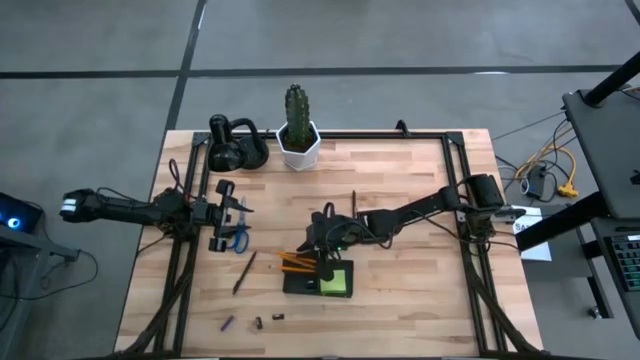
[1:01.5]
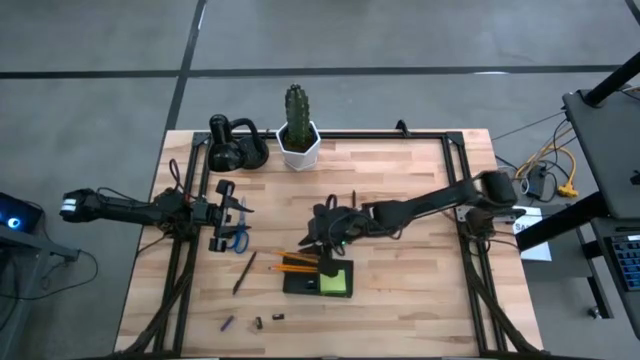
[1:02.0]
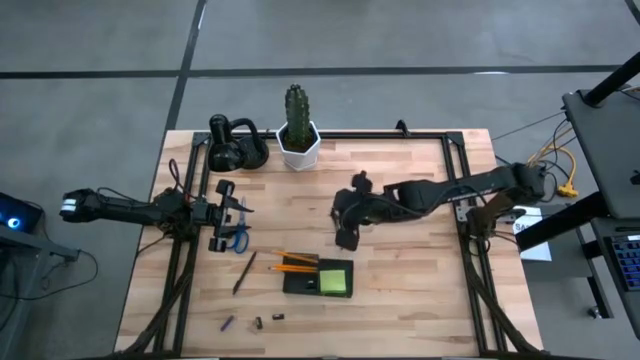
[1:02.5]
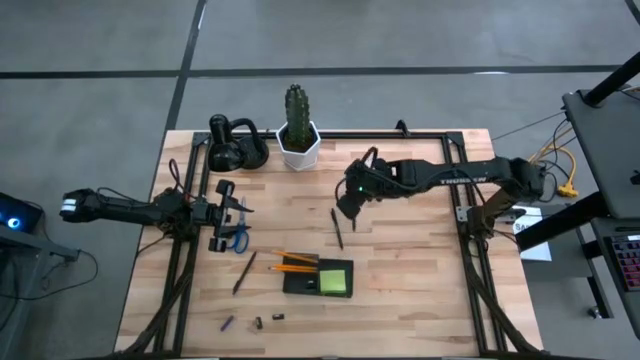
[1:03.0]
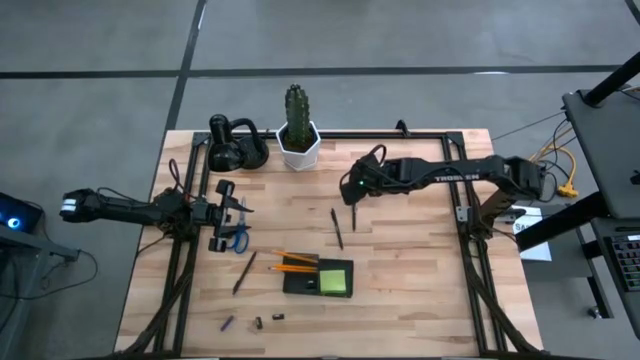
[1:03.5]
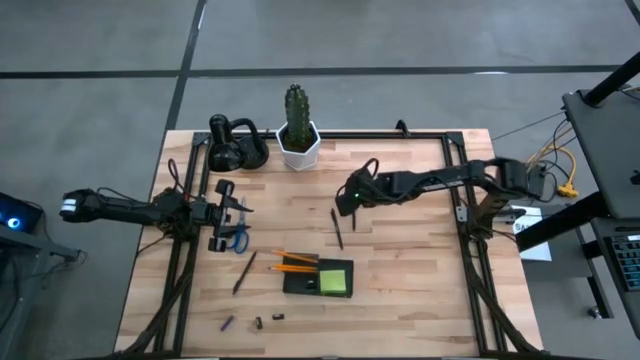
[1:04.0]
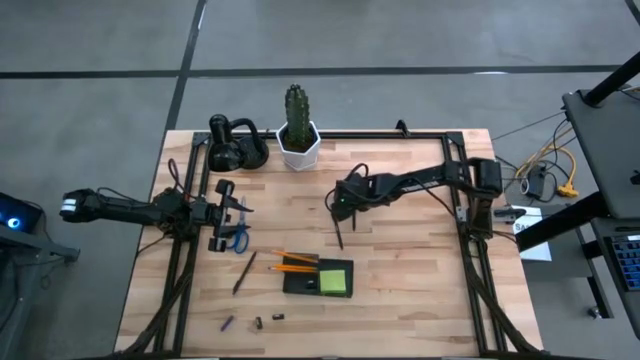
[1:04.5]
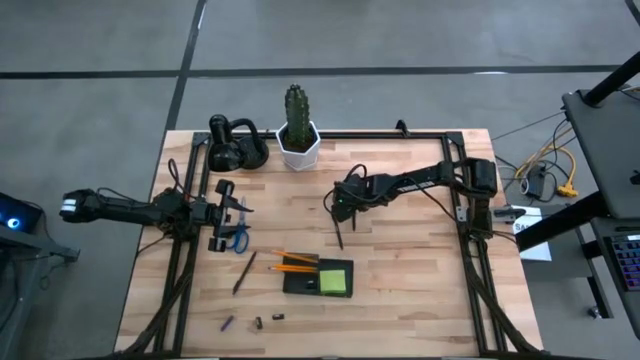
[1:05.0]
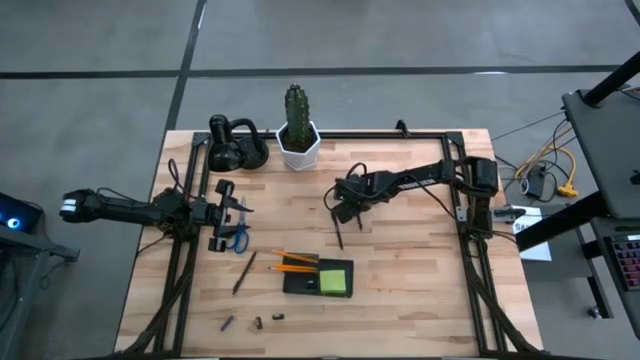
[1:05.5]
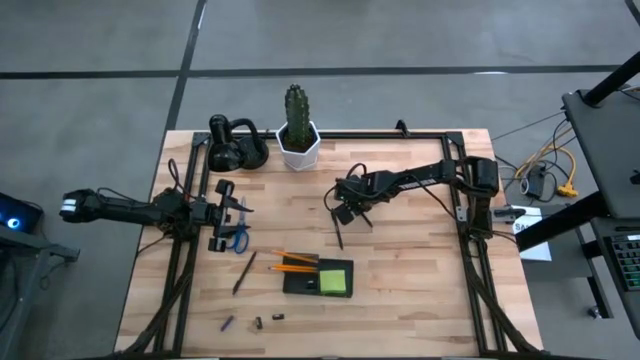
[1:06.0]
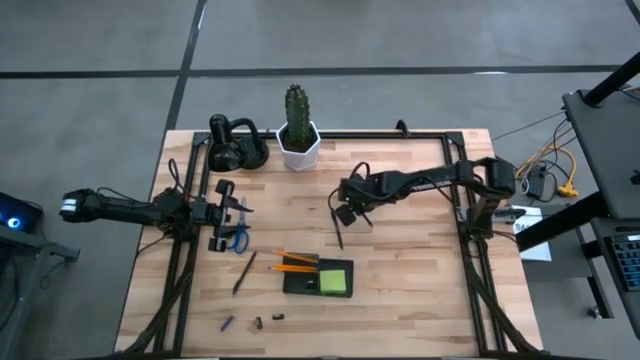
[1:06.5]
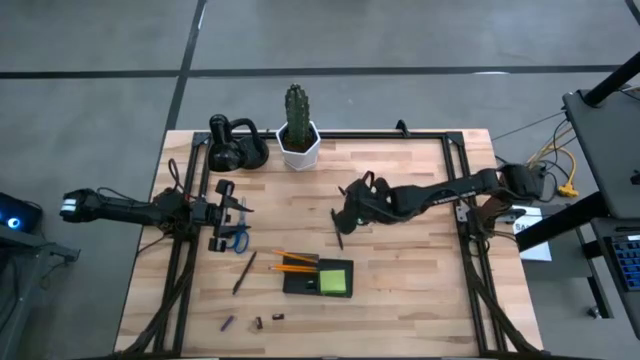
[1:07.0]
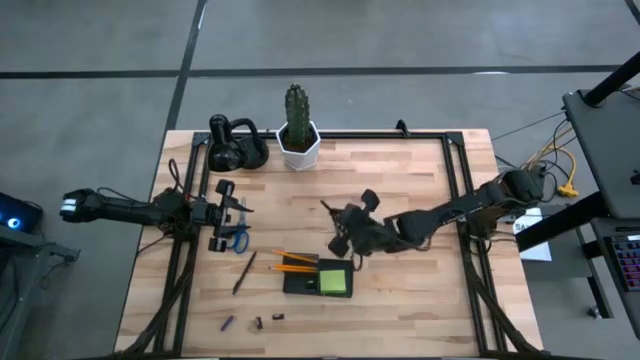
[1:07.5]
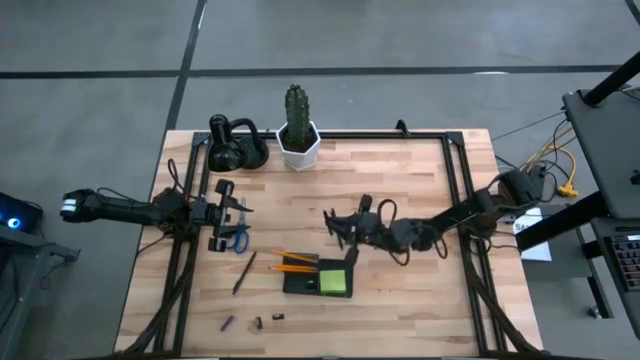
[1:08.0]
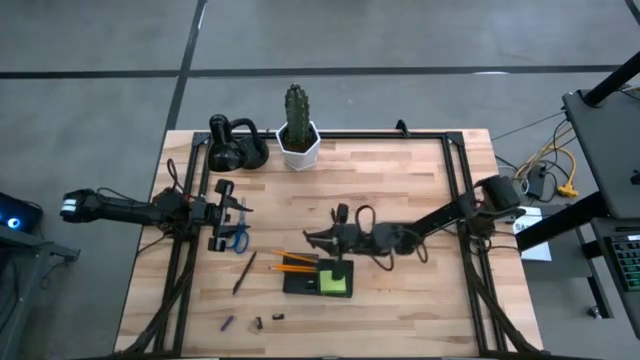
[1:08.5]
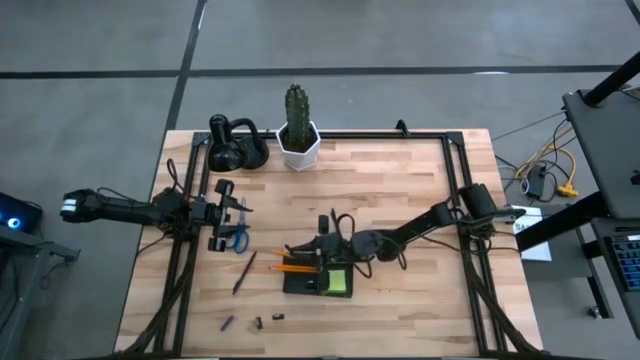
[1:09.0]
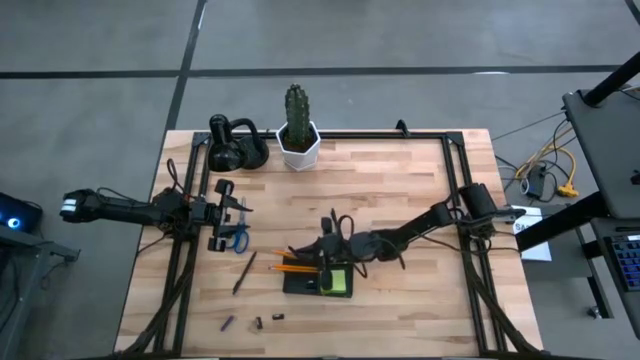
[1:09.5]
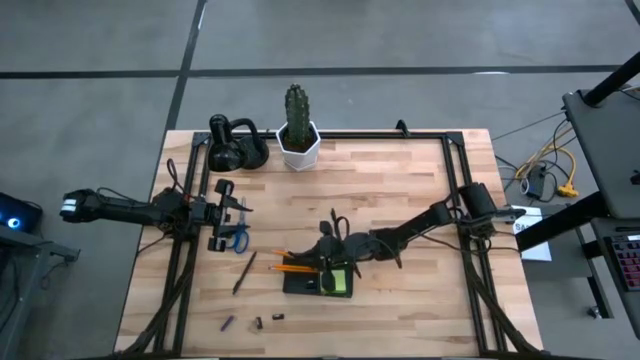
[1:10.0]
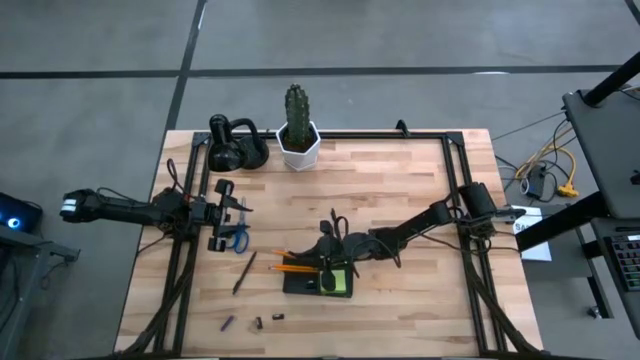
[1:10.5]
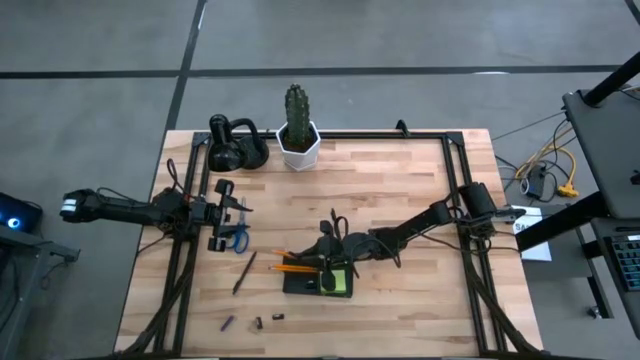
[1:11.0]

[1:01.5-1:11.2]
Task: Pick and place office supplies into organizer
Put the right black ballpen into the desk organizer

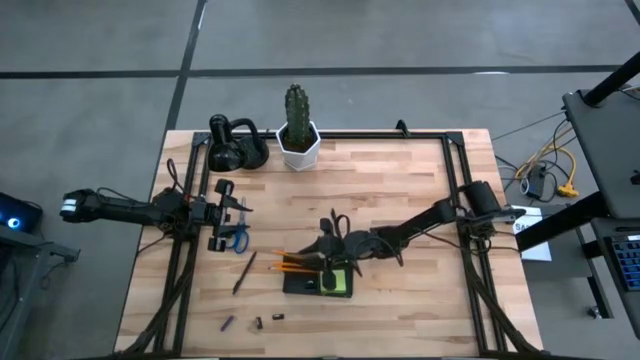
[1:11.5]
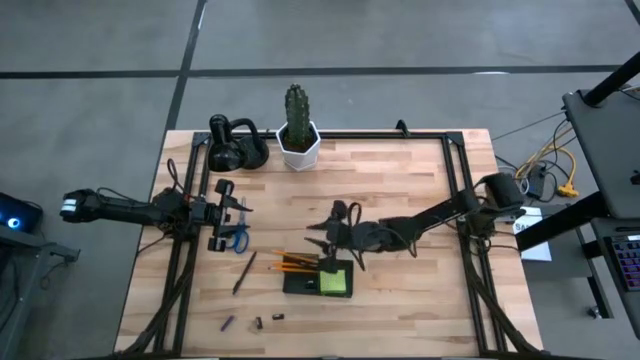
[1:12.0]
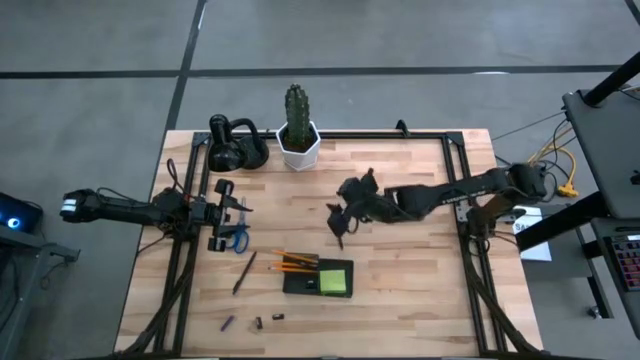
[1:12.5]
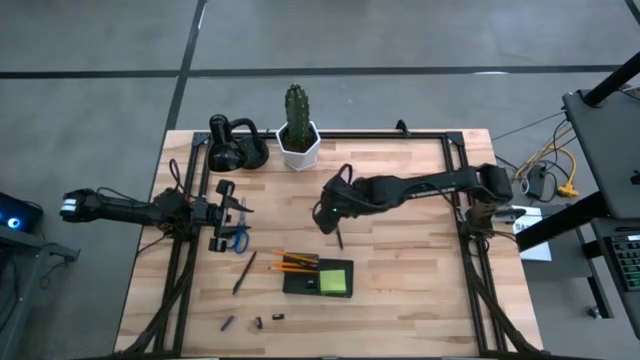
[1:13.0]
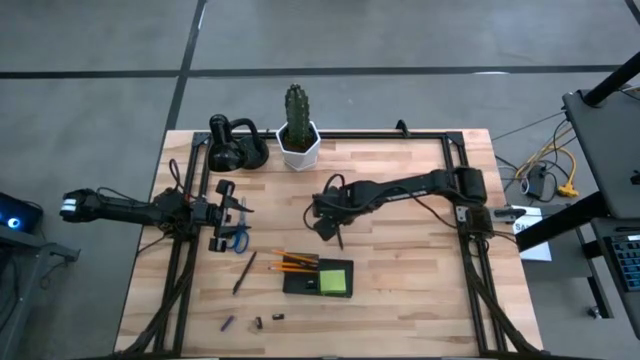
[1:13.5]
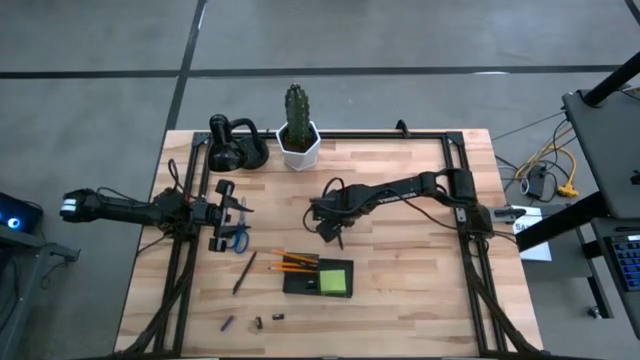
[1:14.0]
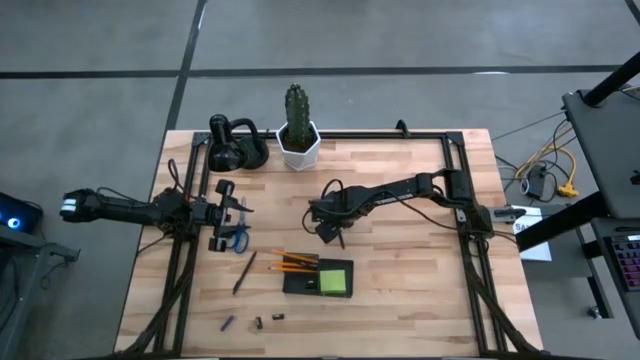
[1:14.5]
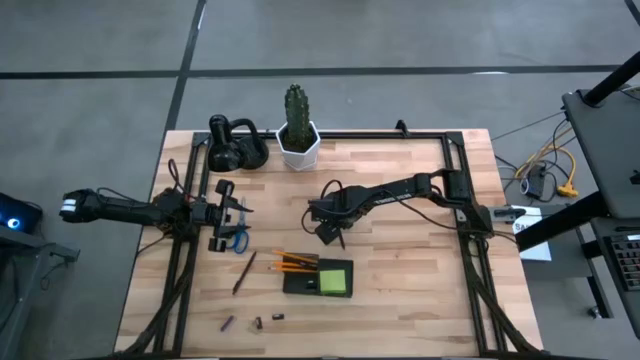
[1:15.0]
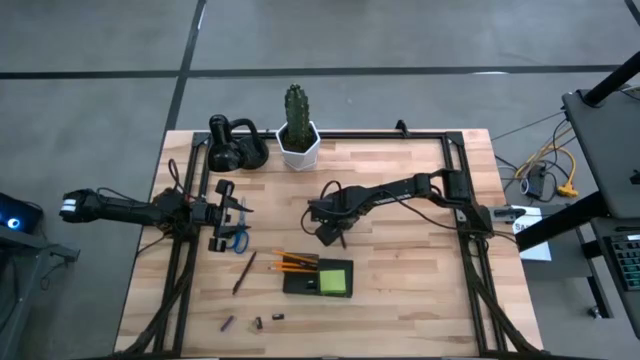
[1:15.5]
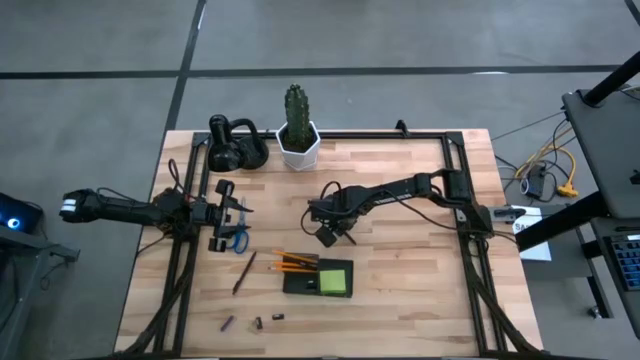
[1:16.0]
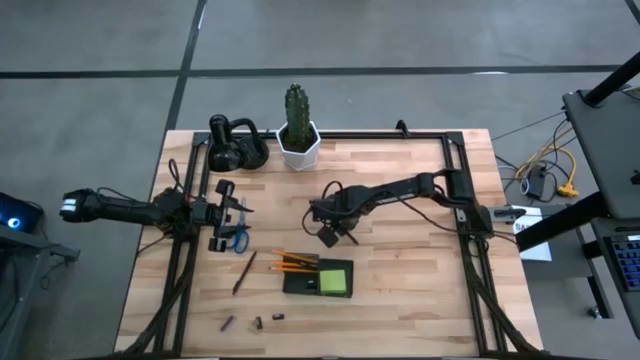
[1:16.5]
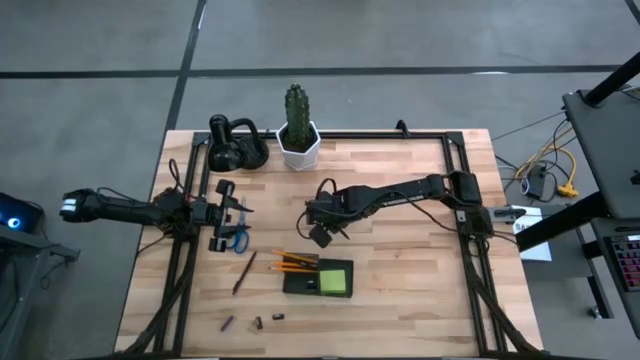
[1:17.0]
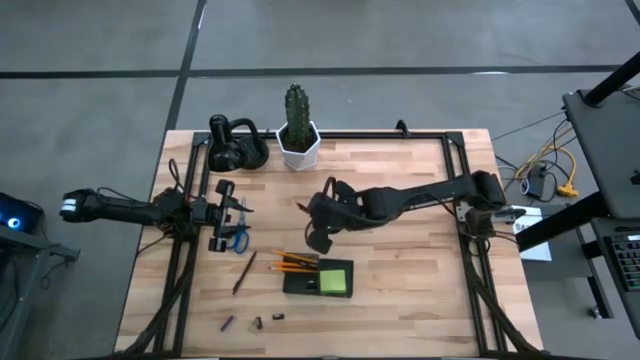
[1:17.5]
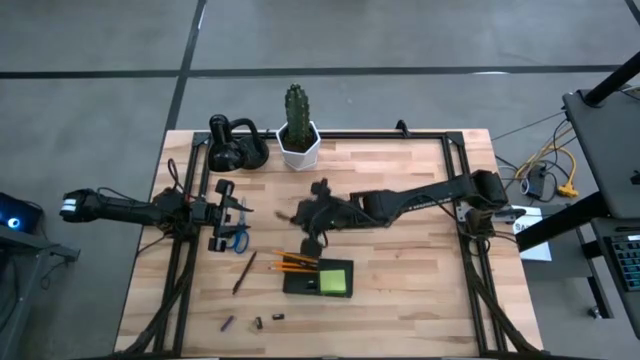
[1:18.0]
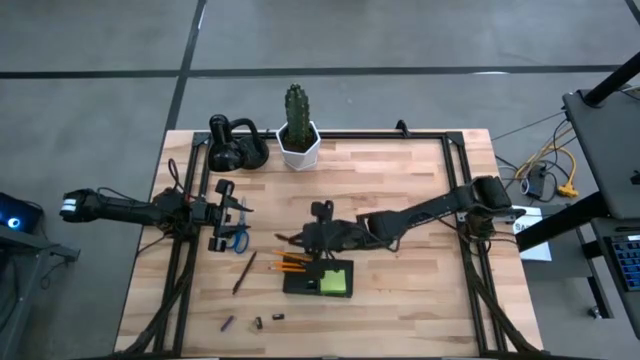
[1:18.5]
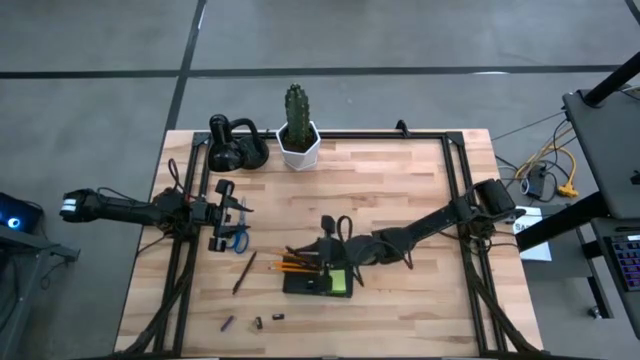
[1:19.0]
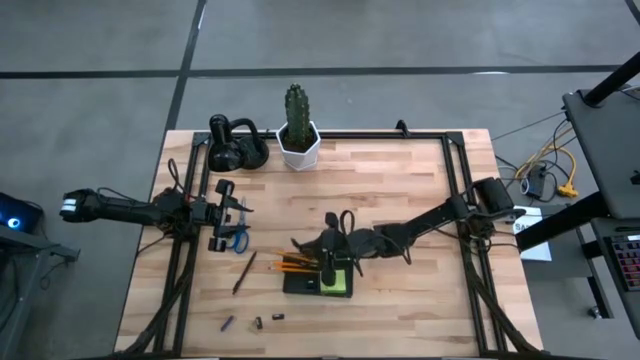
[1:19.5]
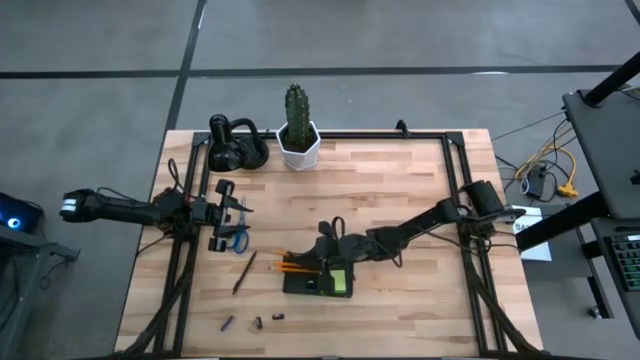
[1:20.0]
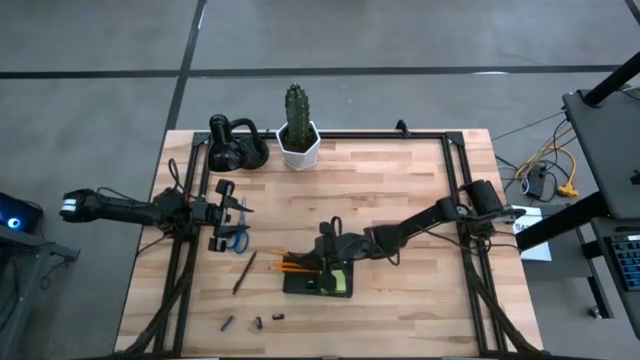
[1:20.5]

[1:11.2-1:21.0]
Put the top black ballpen into the desk organizer

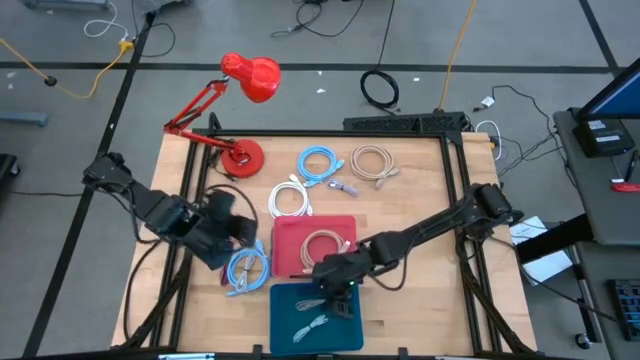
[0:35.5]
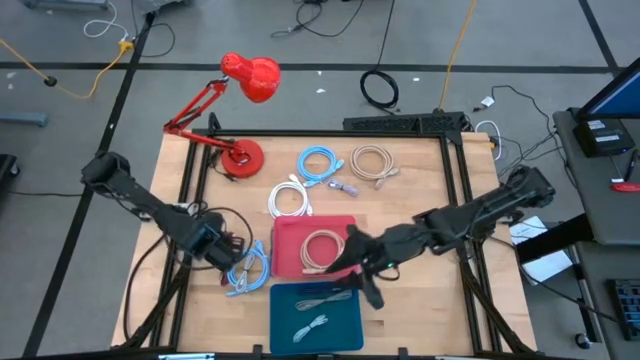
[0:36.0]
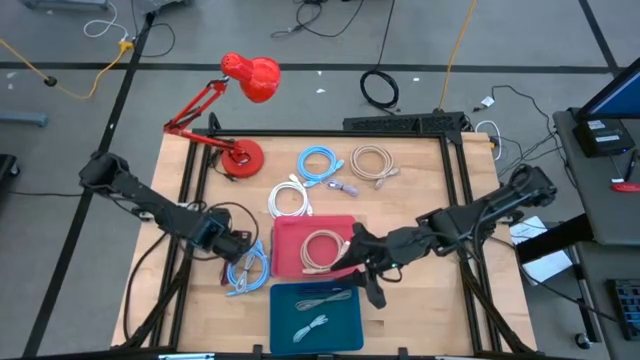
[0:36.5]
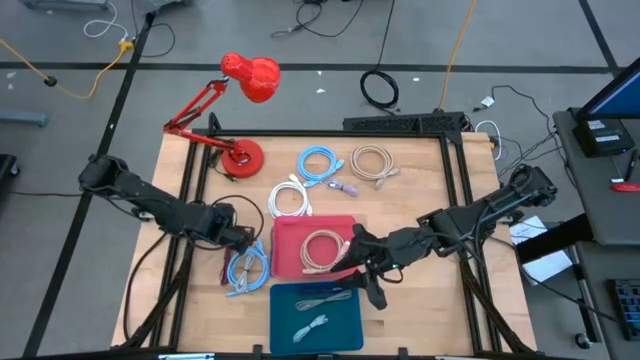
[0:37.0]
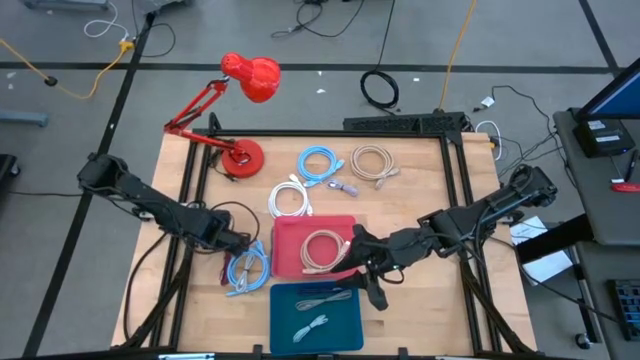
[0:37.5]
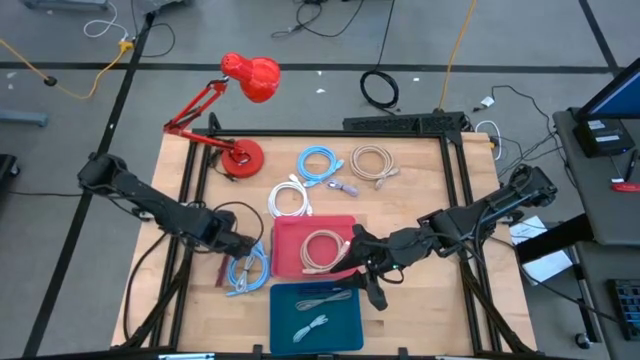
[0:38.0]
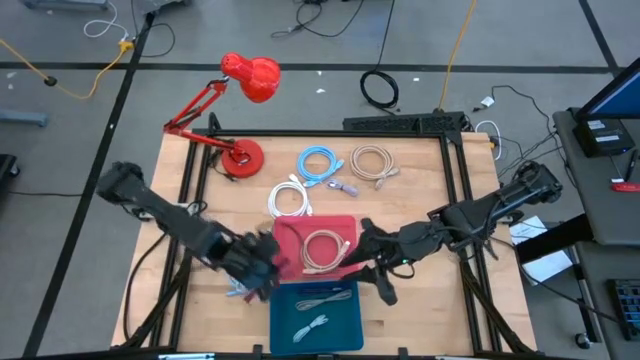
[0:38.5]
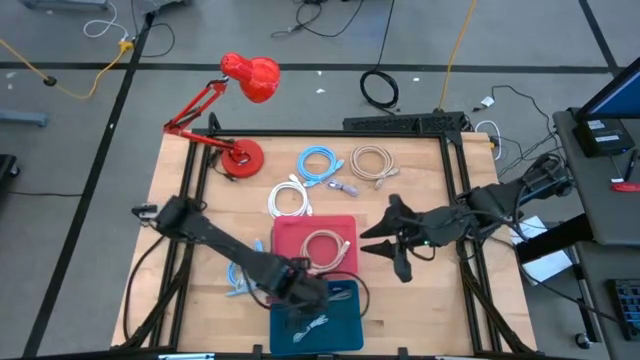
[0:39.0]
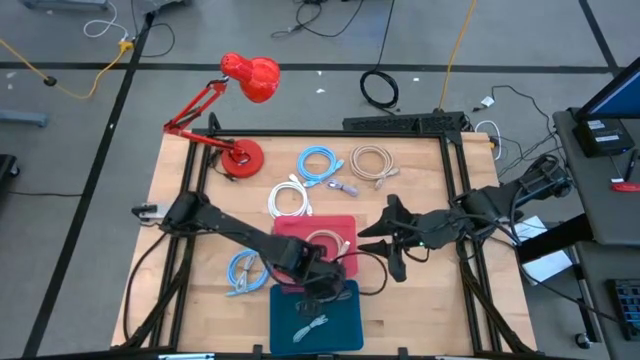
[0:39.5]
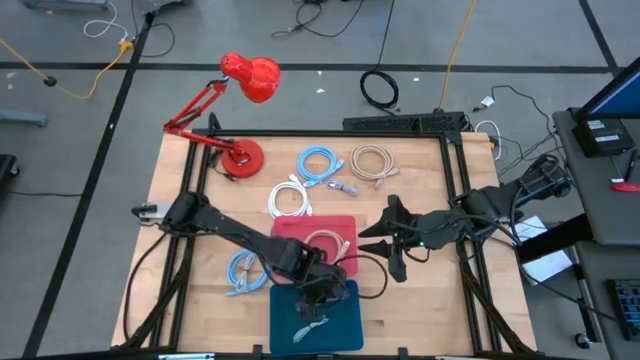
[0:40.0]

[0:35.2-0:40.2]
Task: Pick & Place USB Port
Put the pink and black charger cable into the blue bin
